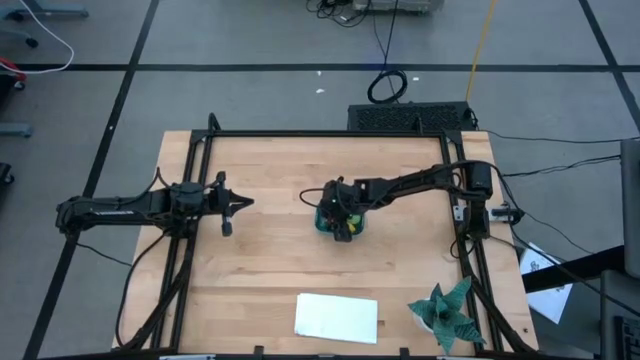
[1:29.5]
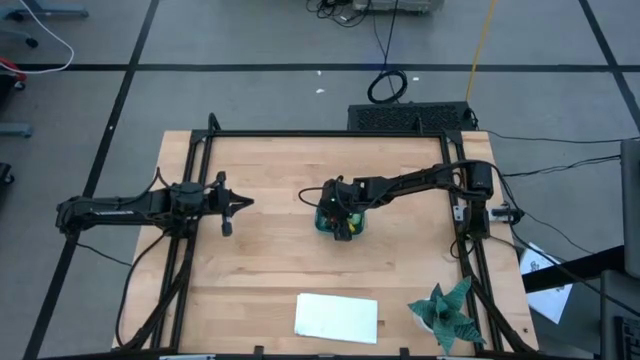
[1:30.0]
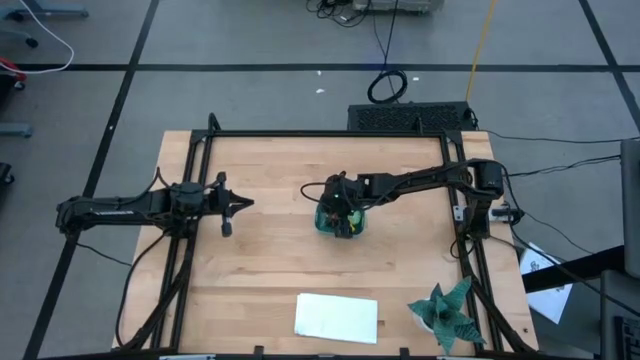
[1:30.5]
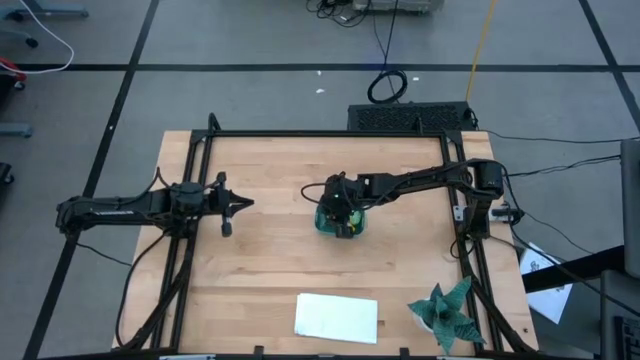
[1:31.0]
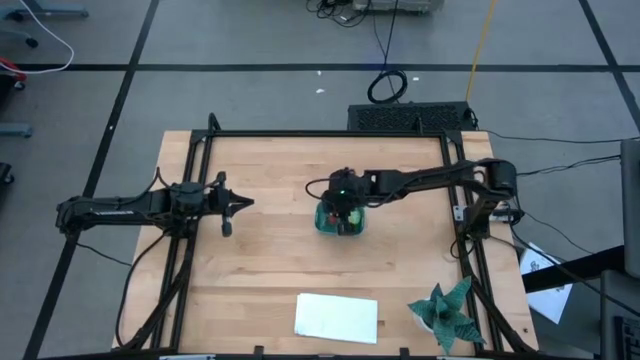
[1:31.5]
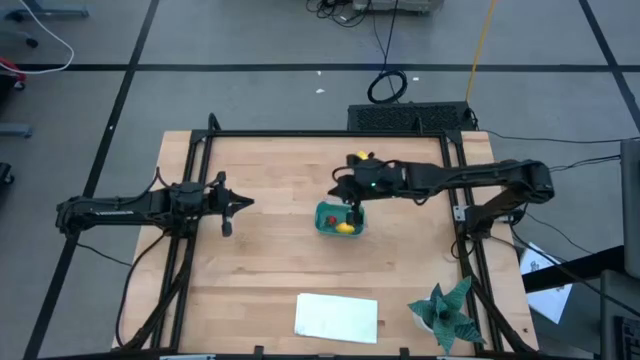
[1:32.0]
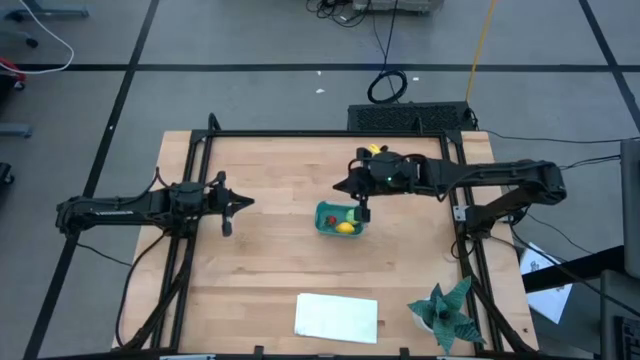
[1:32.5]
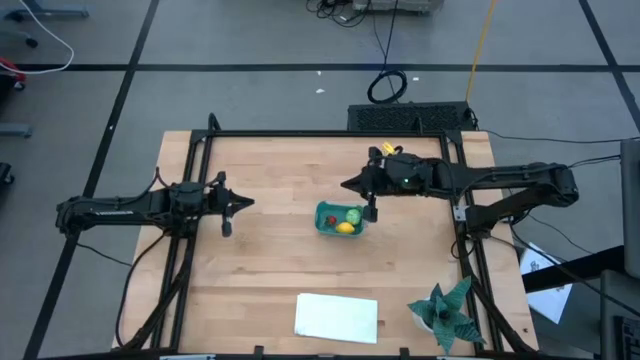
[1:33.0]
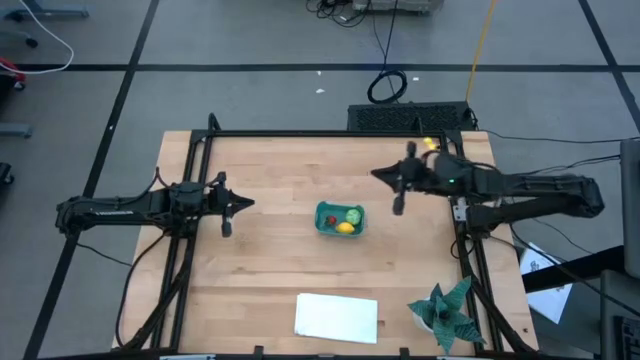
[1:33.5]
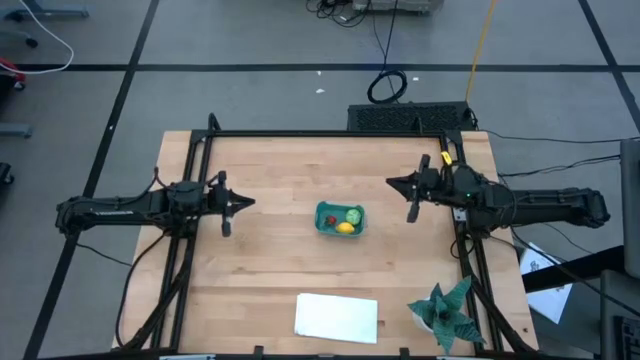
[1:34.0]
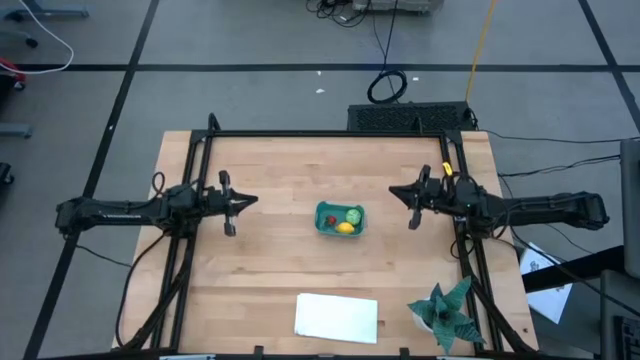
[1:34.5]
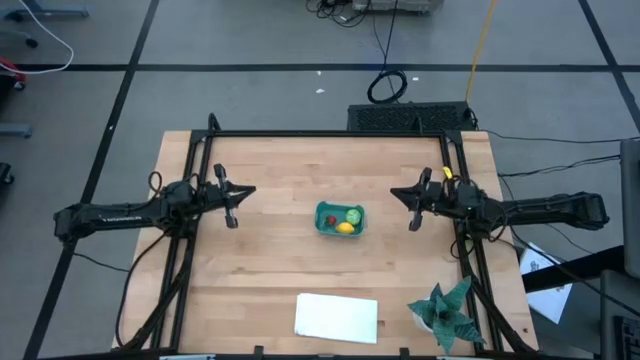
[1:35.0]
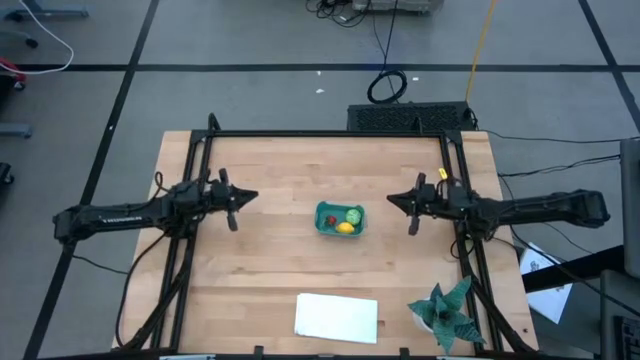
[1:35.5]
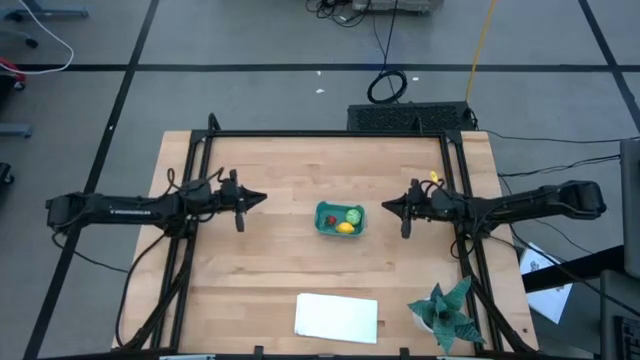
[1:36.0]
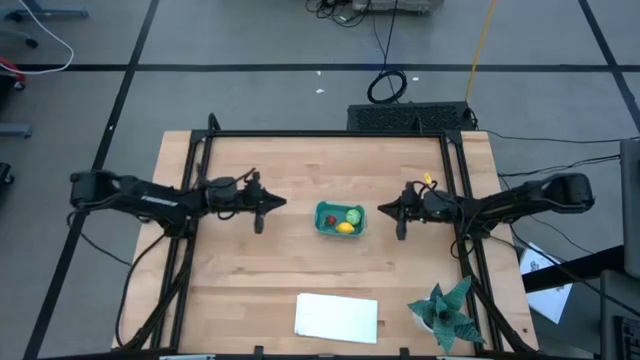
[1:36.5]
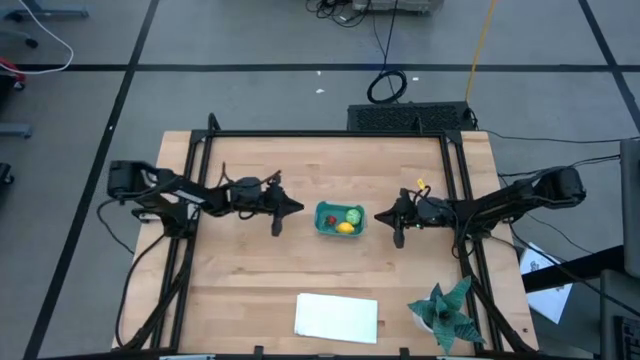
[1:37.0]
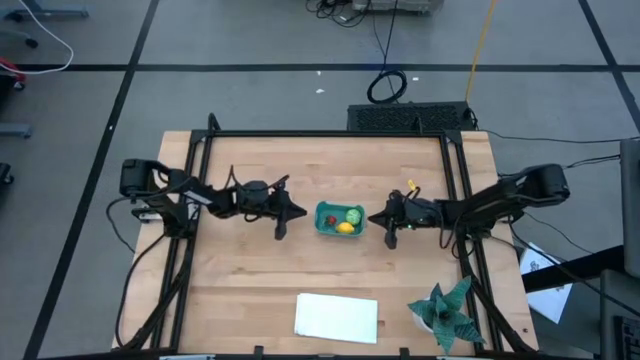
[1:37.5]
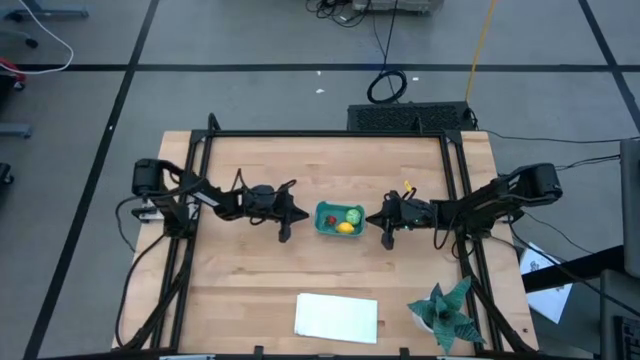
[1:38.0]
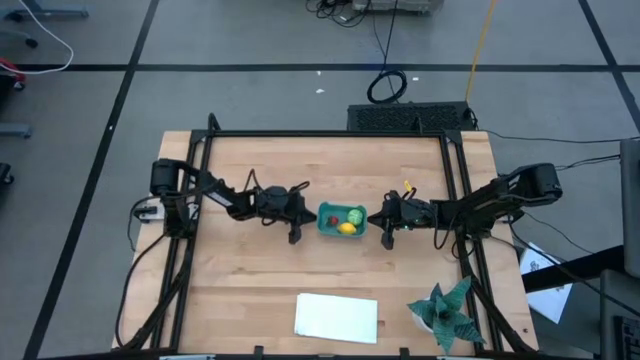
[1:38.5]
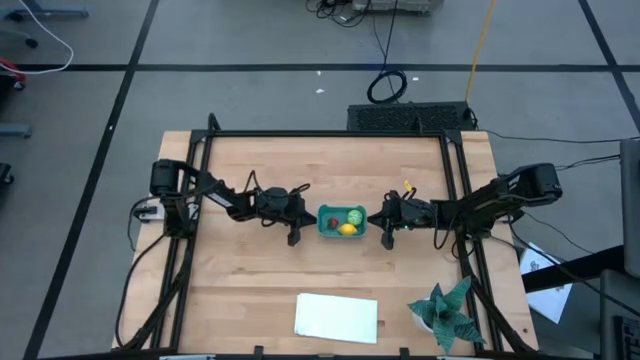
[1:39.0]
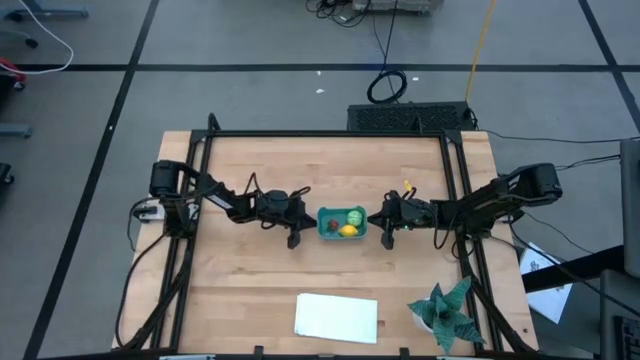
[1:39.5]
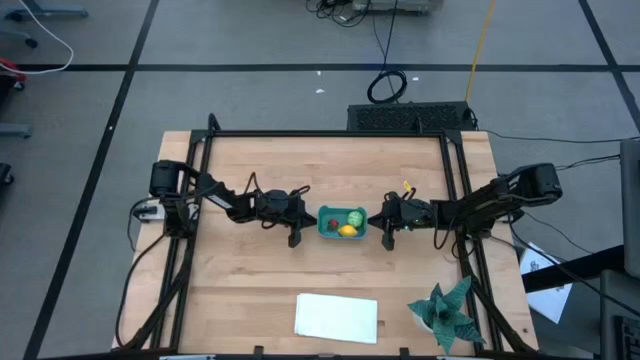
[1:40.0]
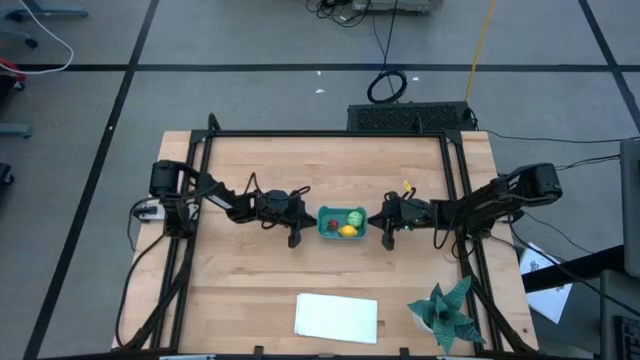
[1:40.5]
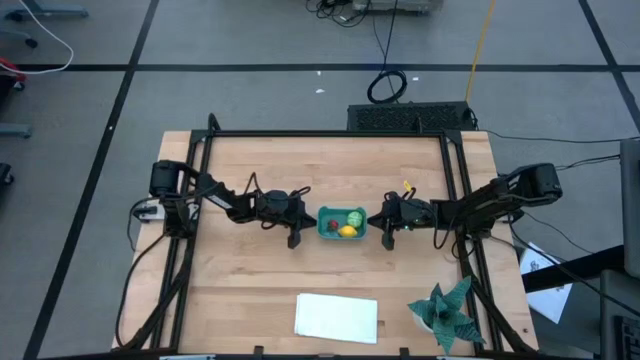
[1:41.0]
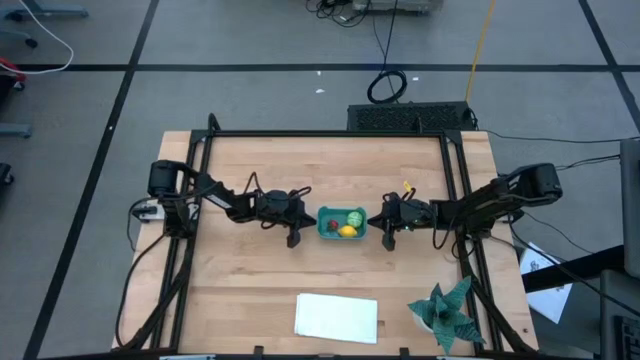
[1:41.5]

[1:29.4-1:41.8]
Task: Pick and placing Produce into tupperware
Adjust the blue bin

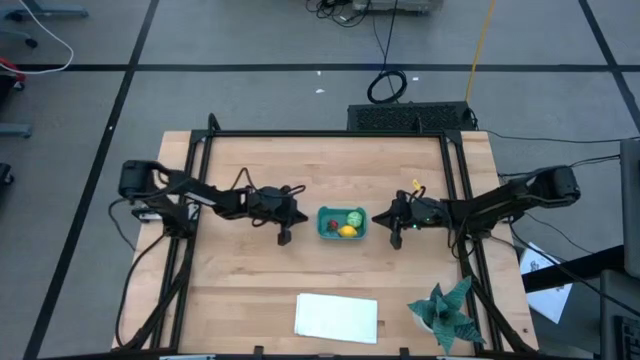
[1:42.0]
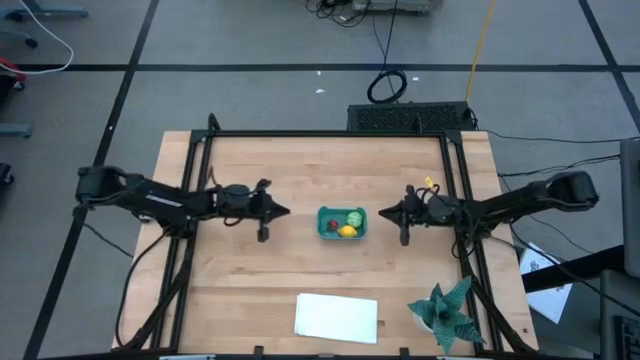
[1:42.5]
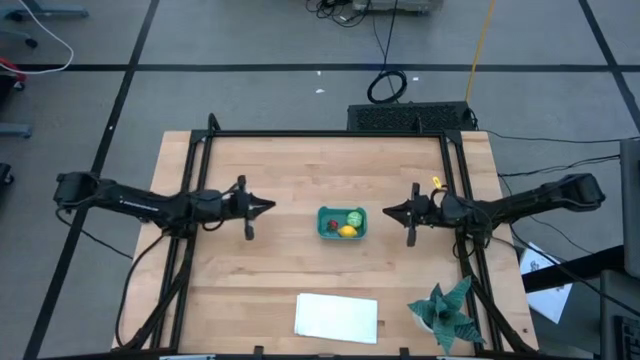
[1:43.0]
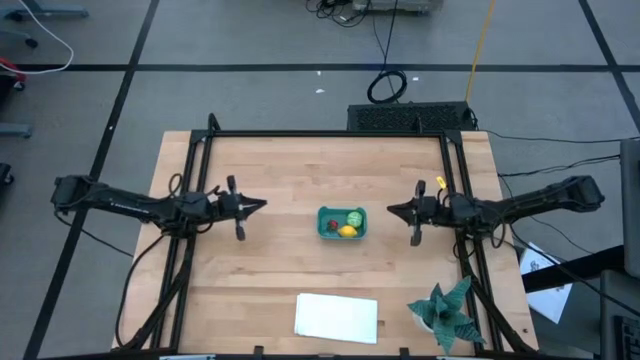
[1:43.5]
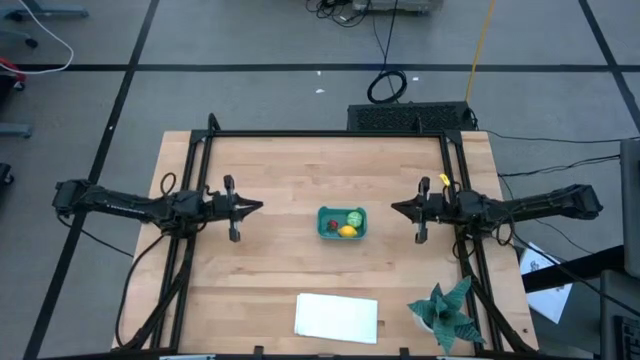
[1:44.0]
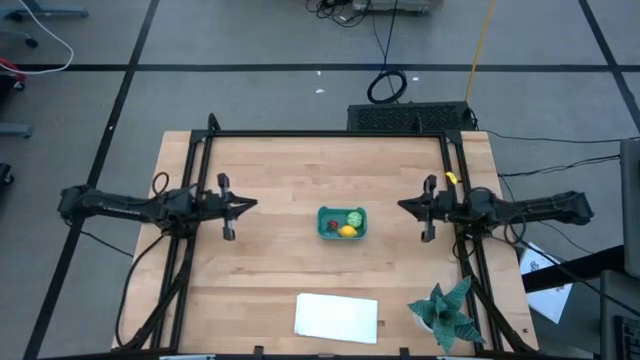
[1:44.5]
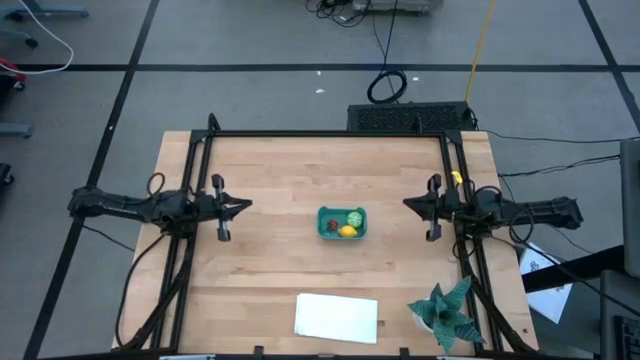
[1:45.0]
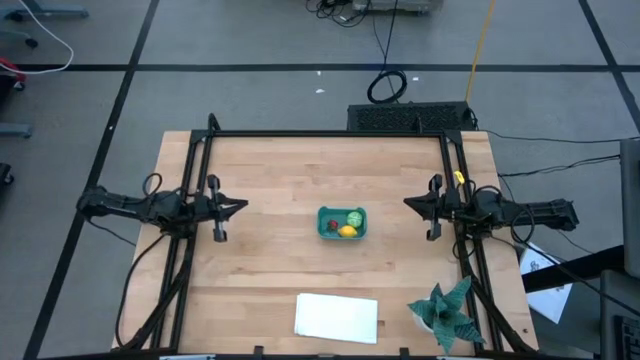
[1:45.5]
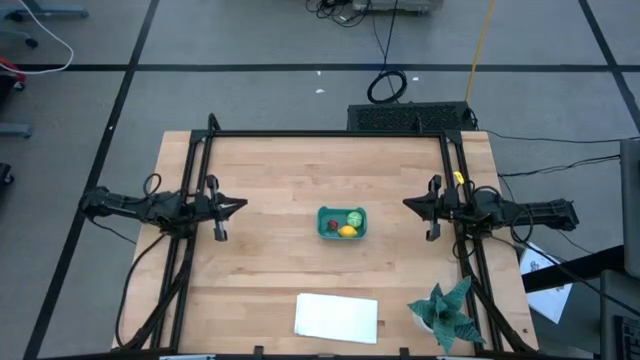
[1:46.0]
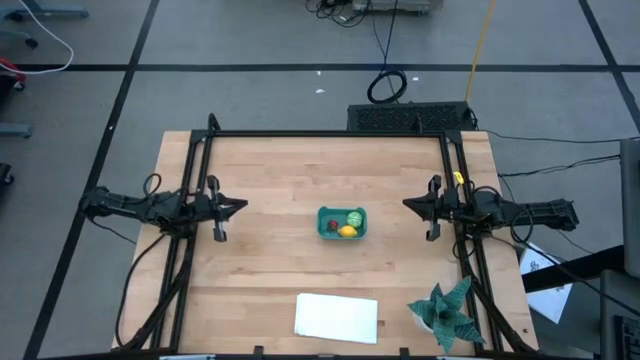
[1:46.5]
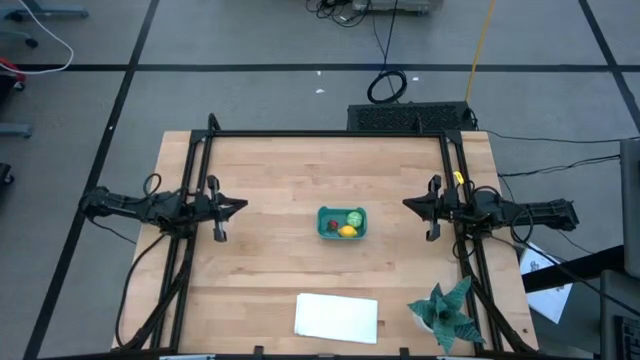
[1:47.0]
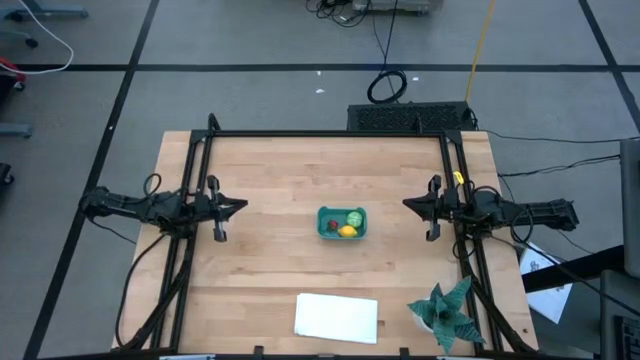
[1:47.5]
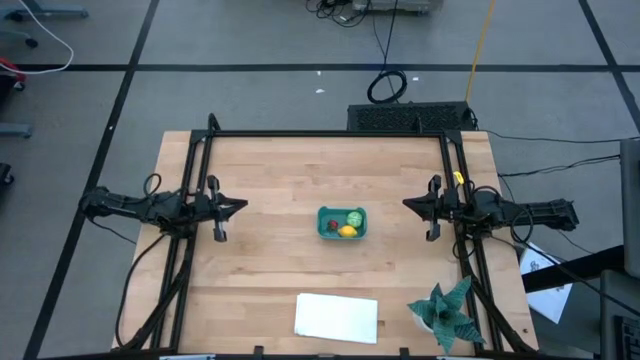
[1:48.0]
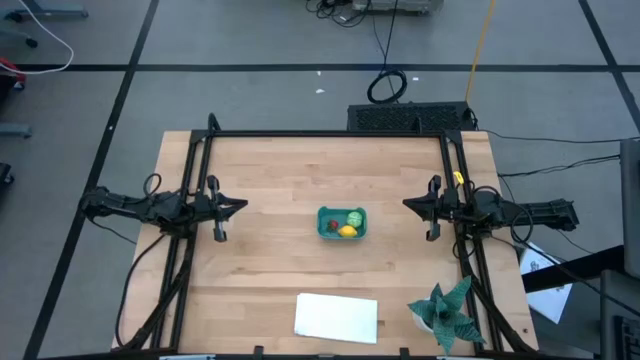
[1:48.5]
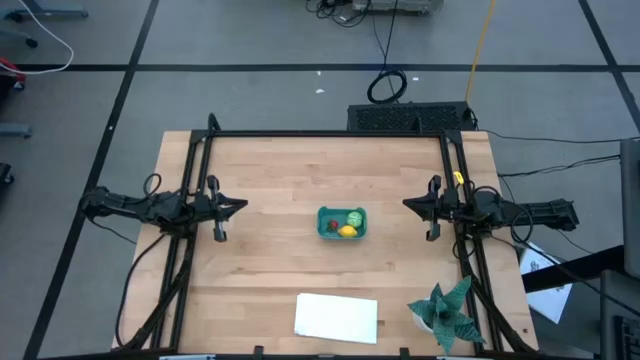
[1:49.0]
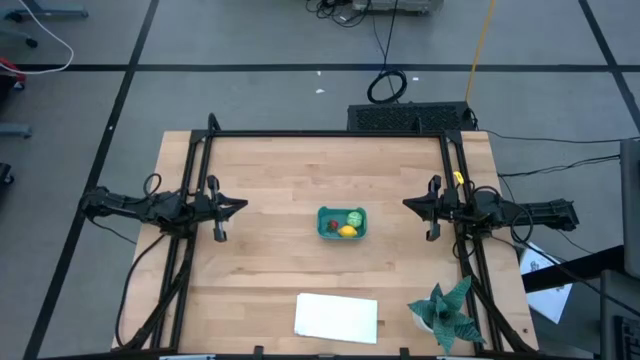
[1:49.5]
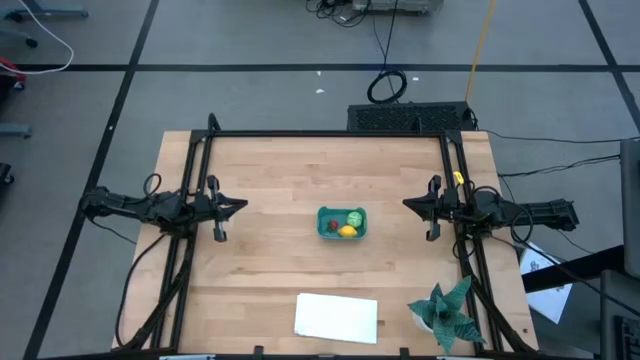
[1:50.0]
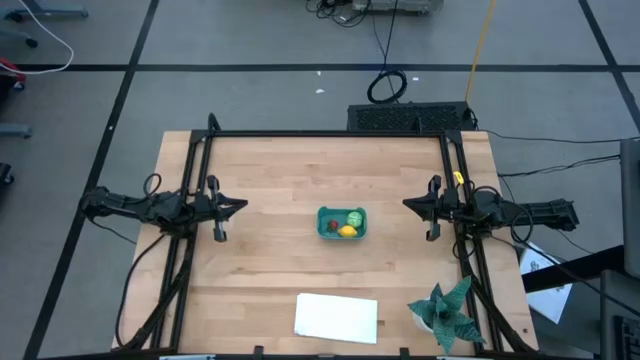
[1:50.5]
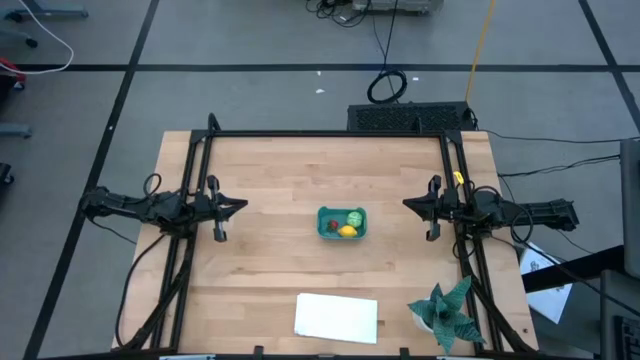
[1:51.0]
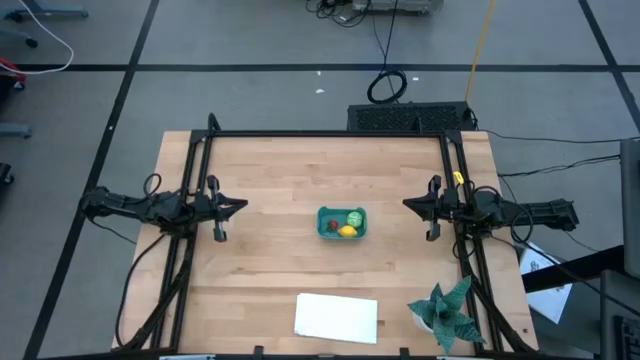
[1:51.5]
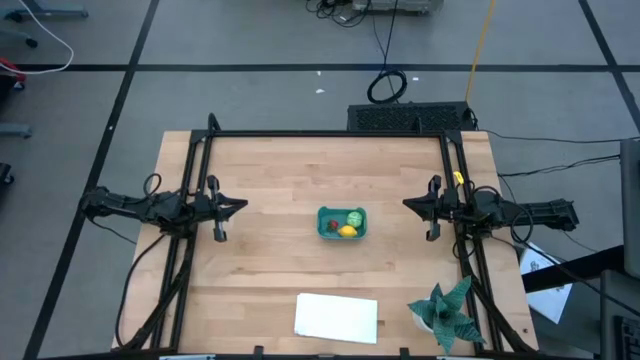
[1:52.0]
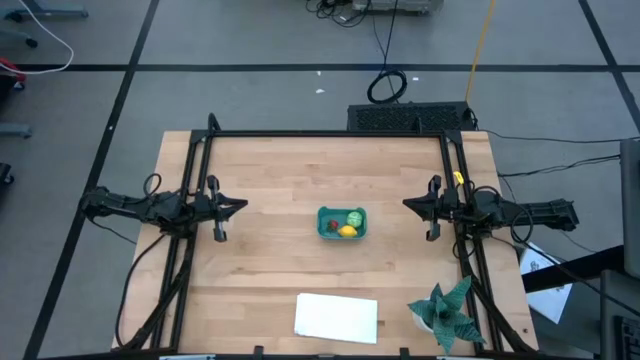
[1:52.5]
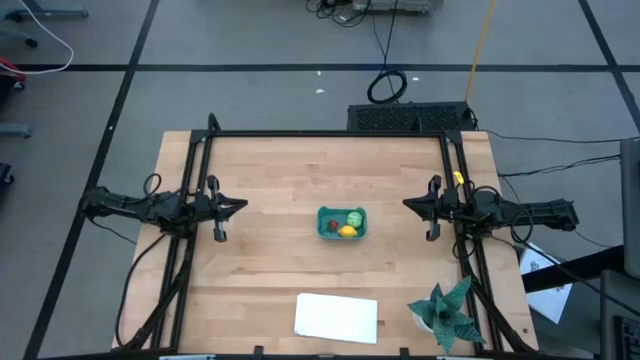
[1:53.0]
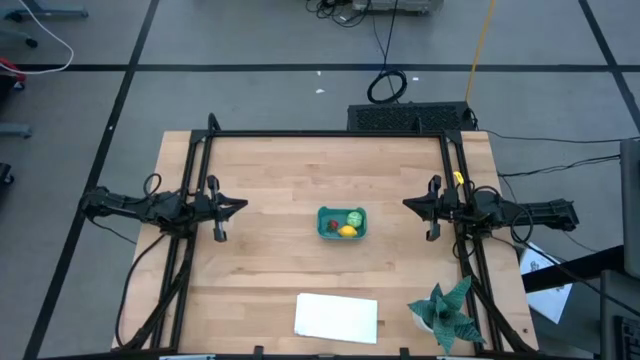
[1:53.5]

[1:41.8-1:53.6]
Return to Home Position
